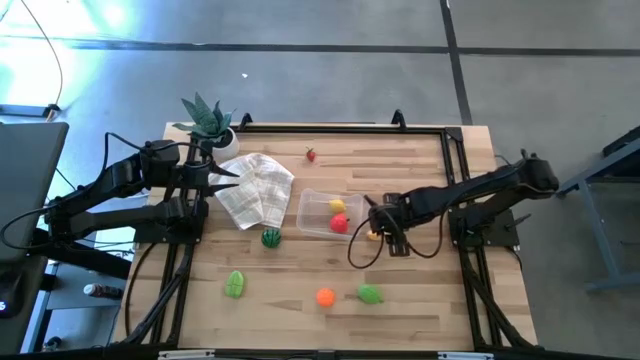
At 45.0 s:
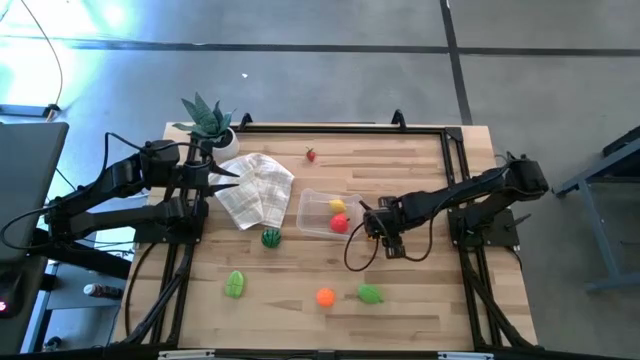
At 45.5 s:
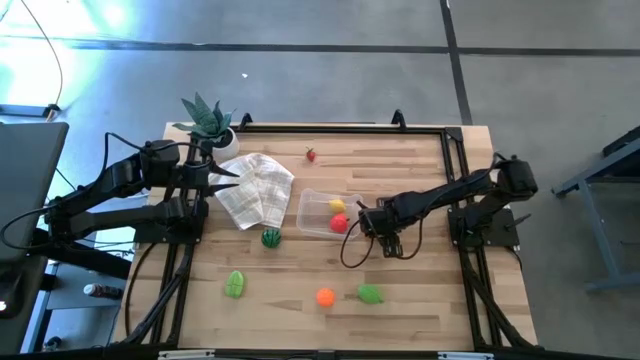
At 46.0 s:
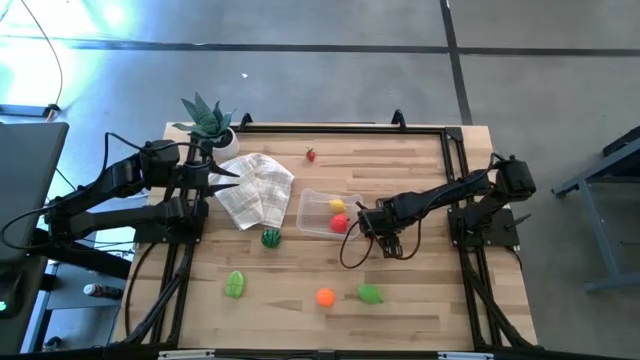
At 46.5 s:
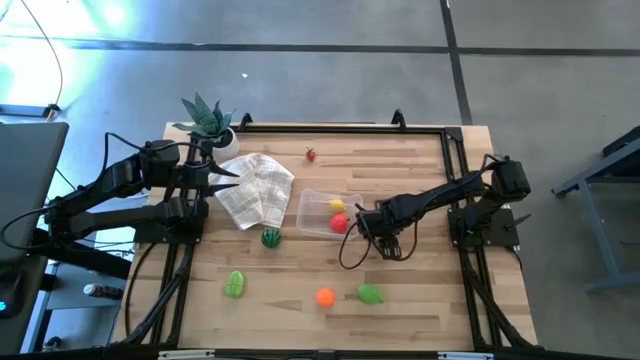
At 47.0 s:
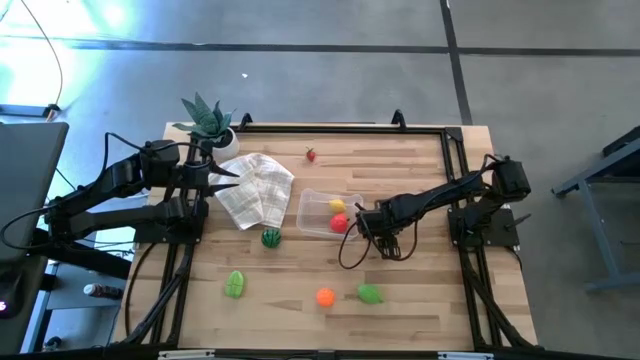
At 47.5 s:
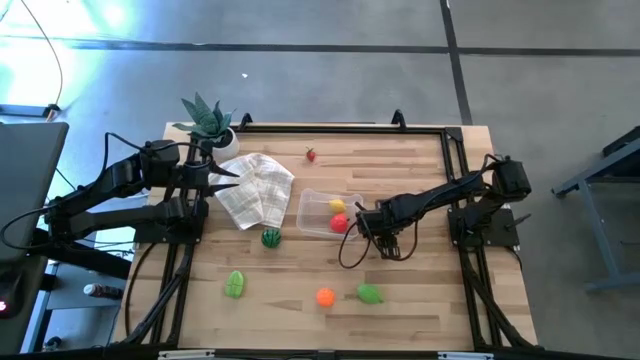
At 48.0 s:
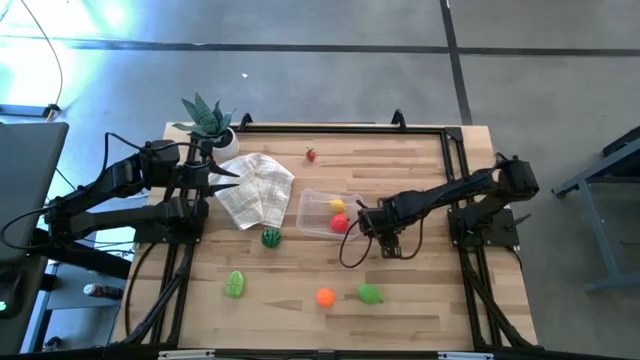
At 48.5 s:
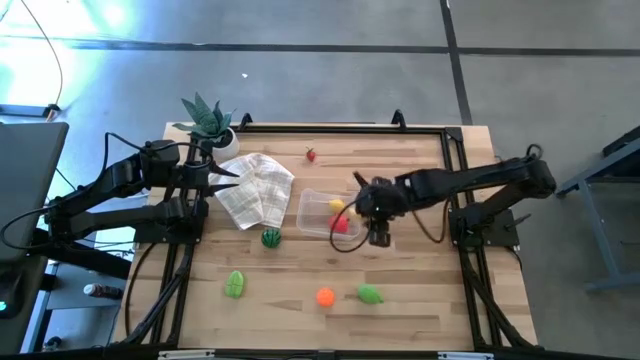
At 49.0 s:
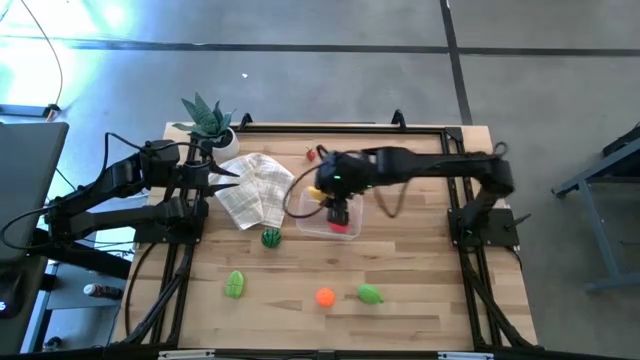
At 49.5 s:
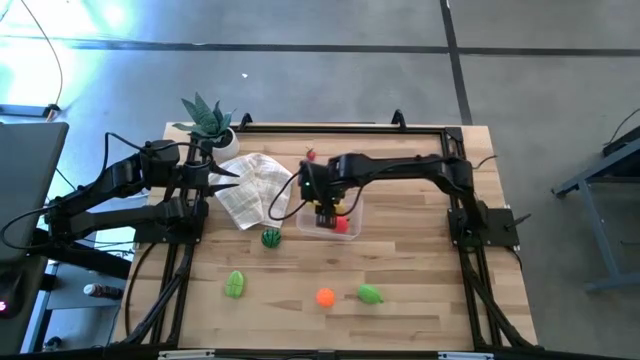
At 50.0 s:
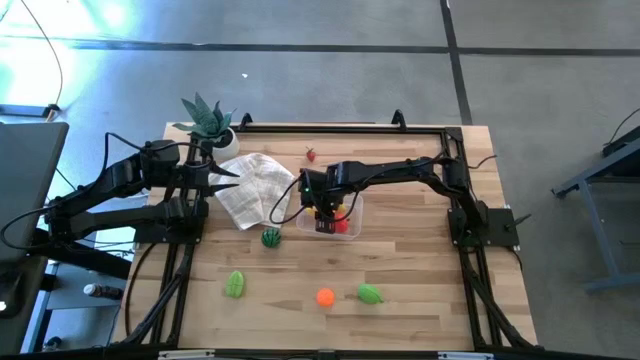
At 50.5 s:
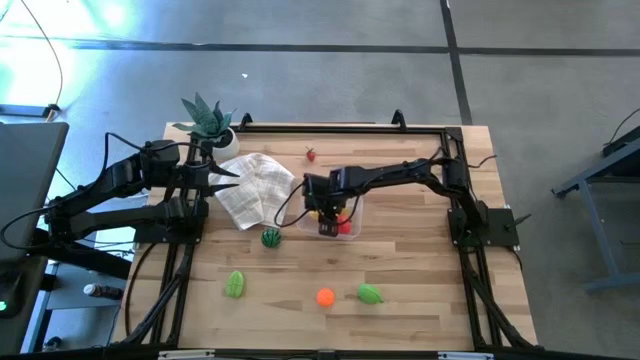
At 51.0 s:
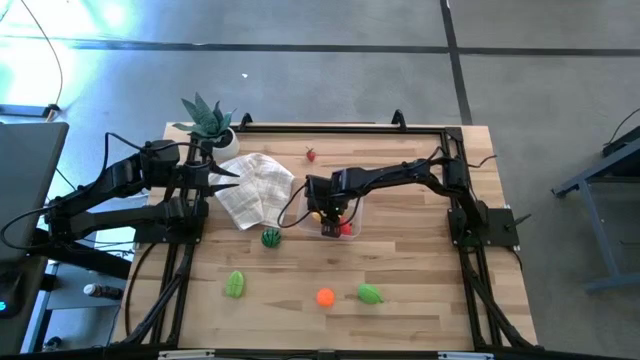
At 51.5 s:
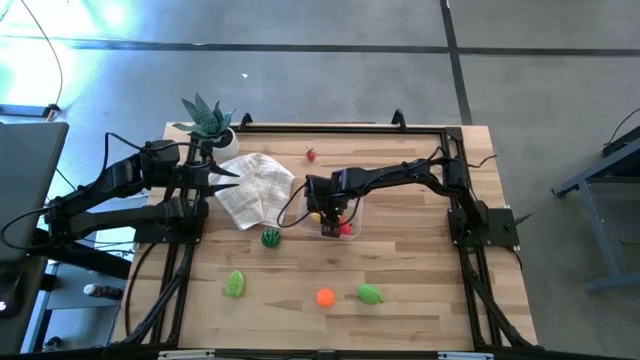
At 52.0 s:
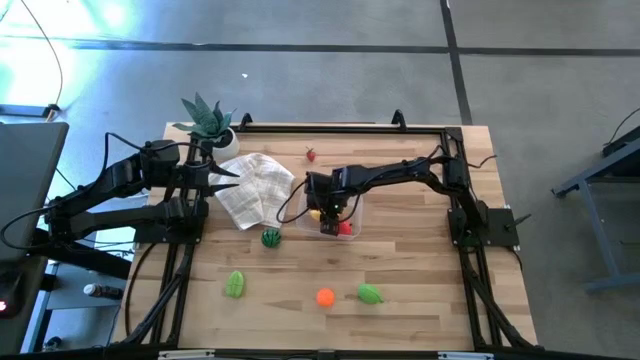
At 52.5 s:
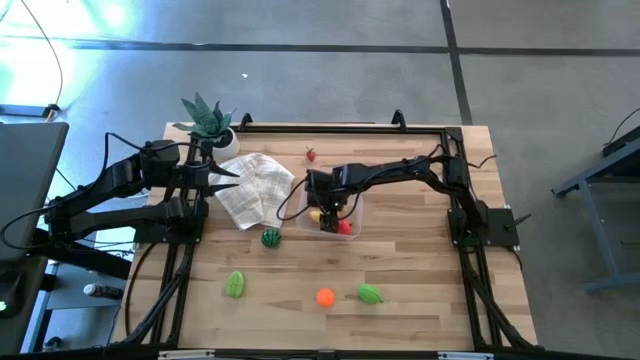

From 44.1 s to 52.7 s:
Task: Pick and placing Produce into tupperware
Put the yellow banana into the transparent container

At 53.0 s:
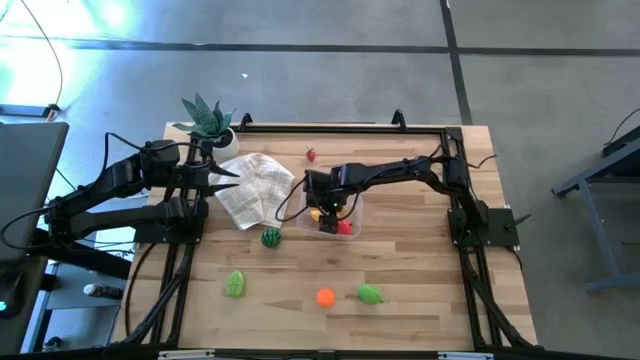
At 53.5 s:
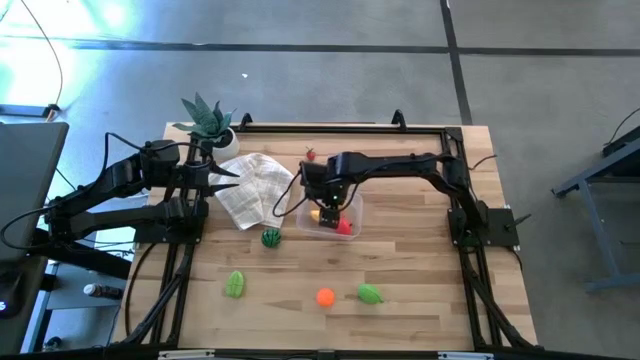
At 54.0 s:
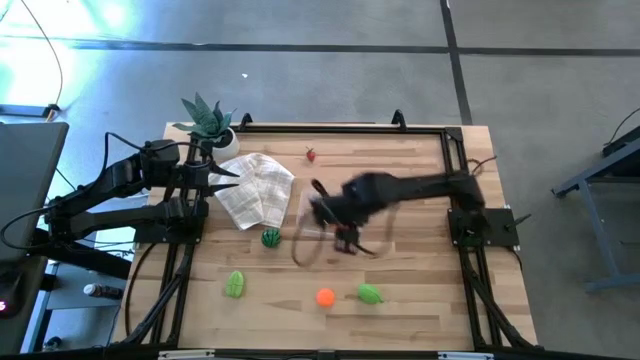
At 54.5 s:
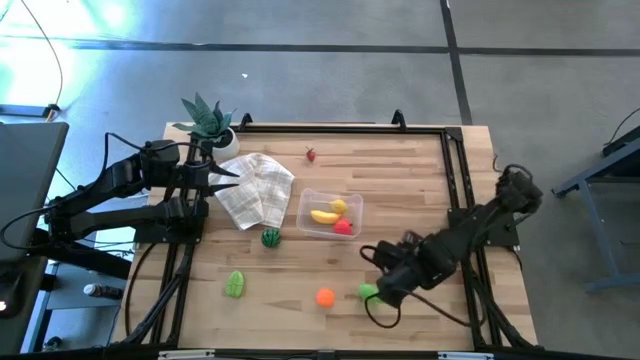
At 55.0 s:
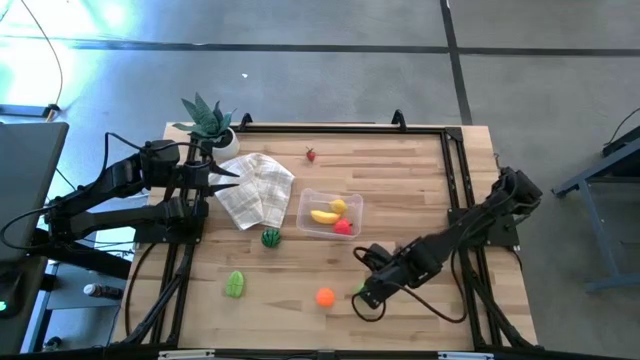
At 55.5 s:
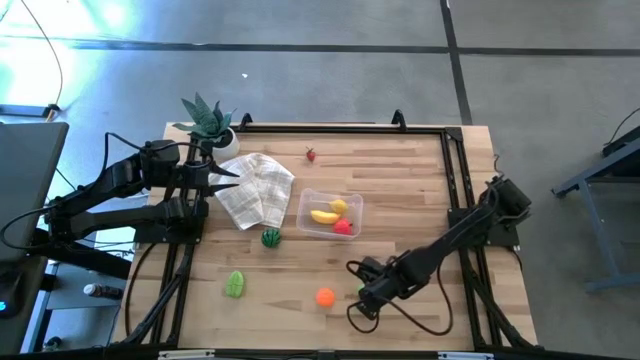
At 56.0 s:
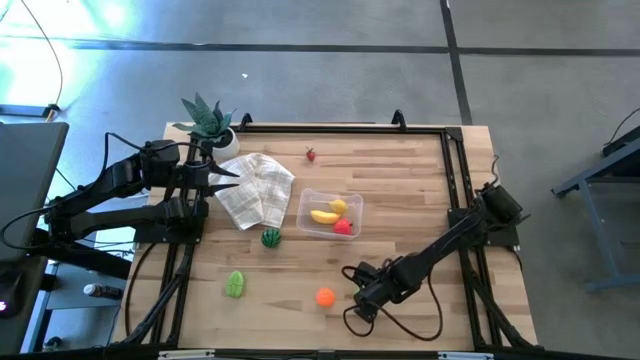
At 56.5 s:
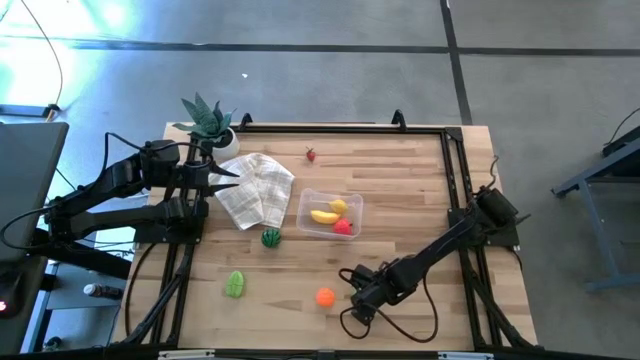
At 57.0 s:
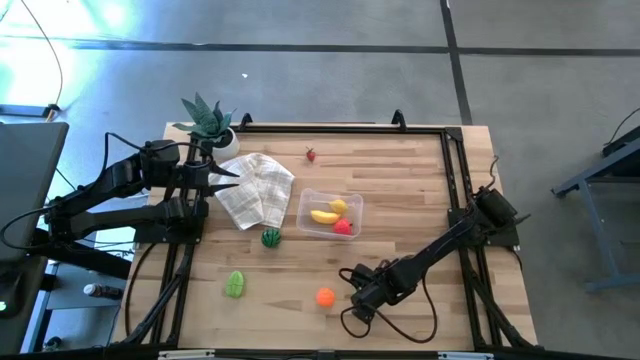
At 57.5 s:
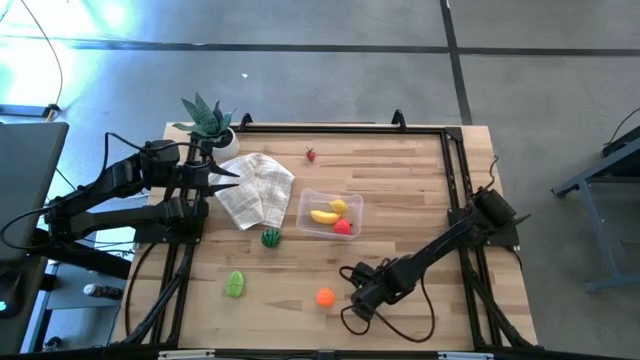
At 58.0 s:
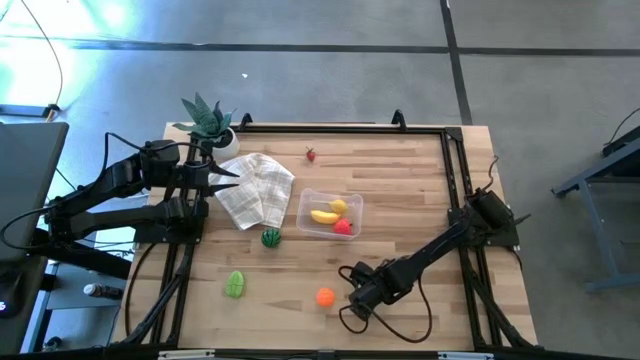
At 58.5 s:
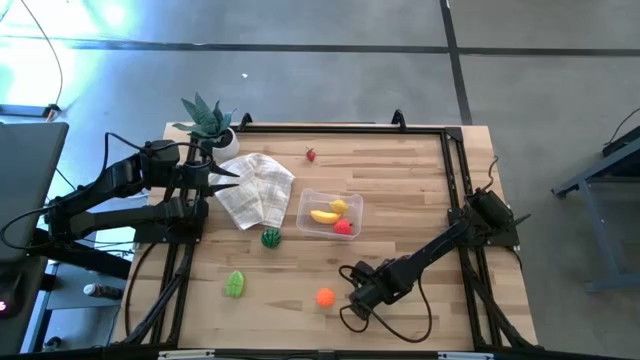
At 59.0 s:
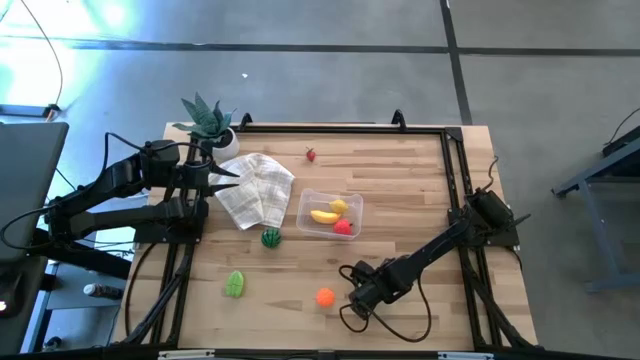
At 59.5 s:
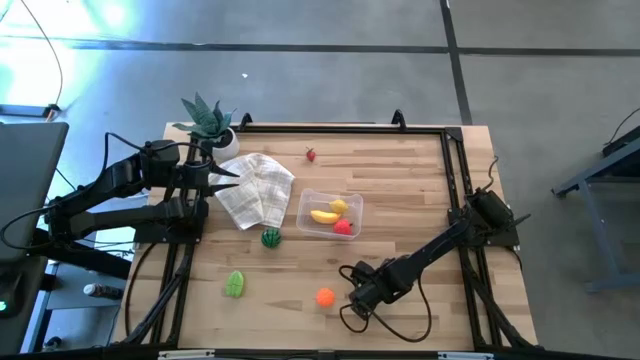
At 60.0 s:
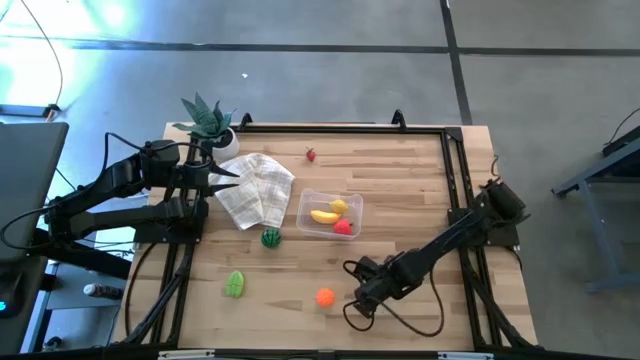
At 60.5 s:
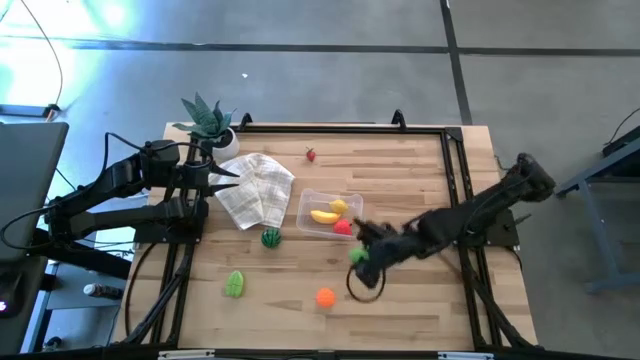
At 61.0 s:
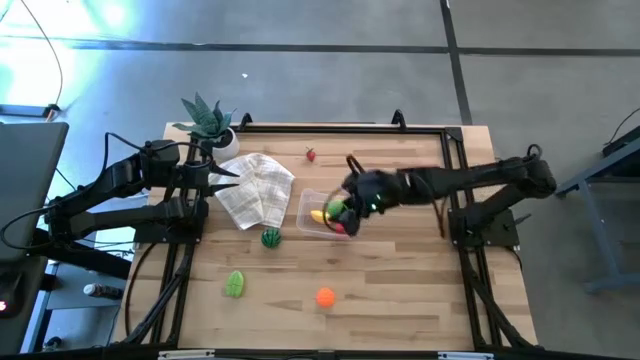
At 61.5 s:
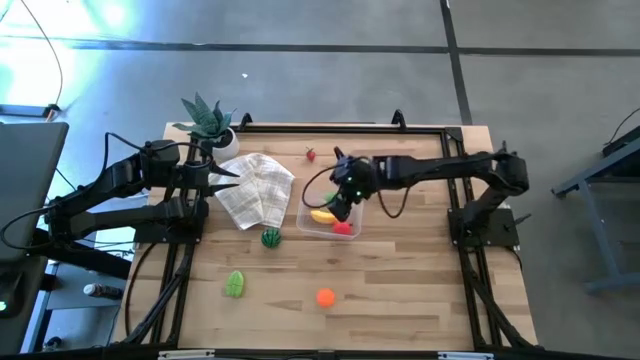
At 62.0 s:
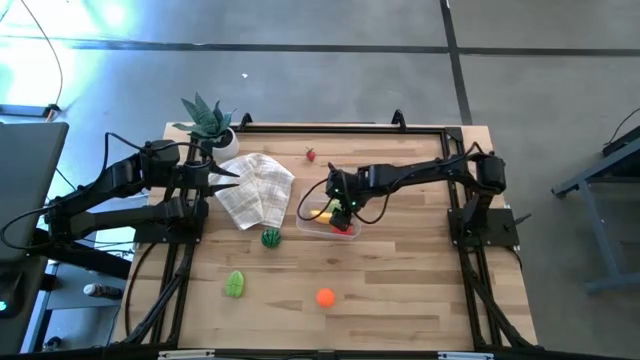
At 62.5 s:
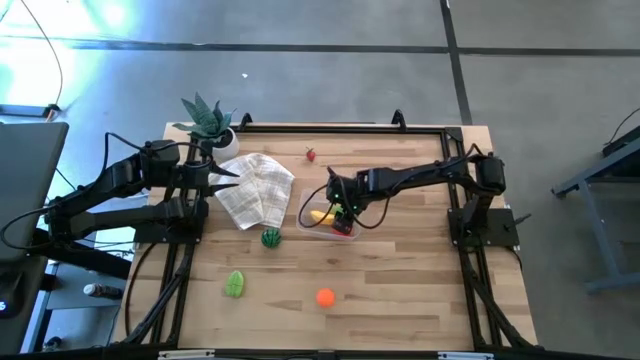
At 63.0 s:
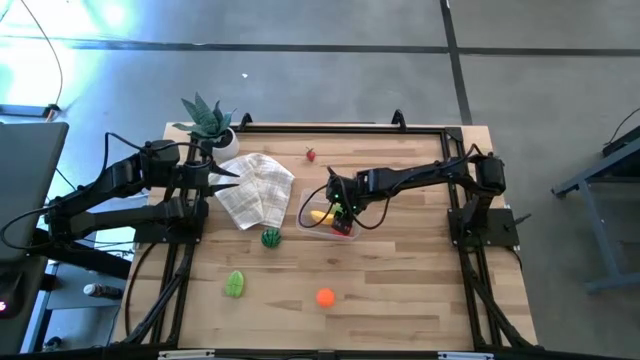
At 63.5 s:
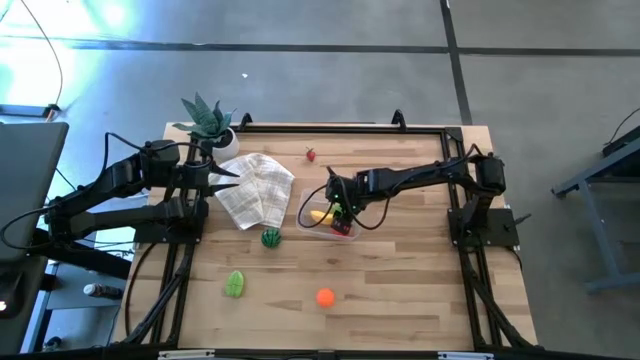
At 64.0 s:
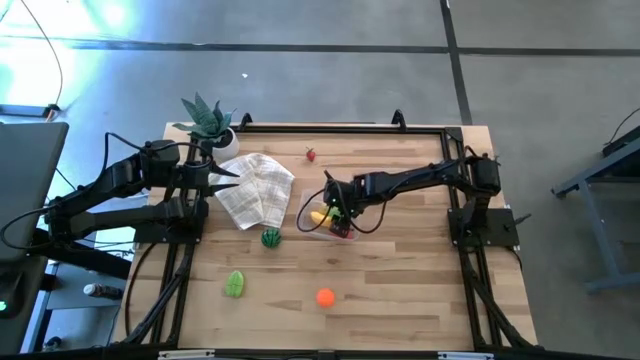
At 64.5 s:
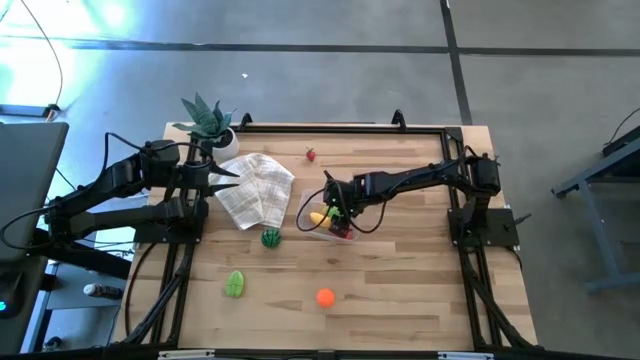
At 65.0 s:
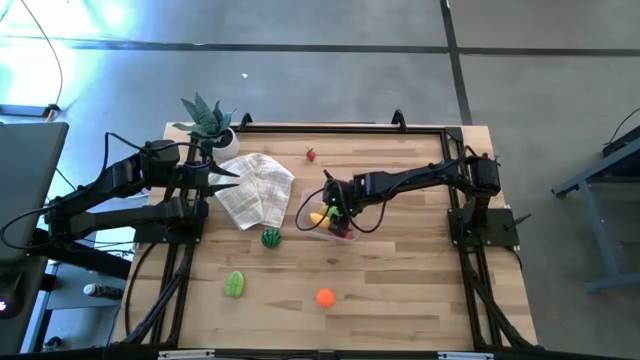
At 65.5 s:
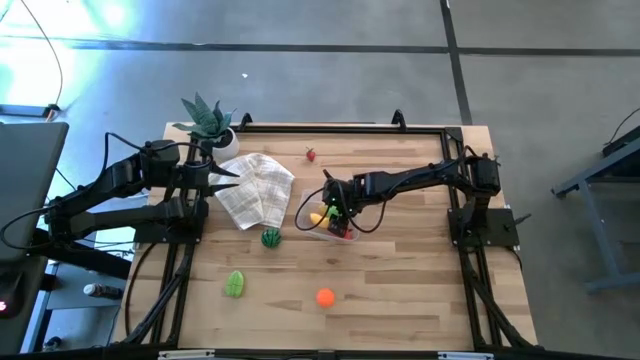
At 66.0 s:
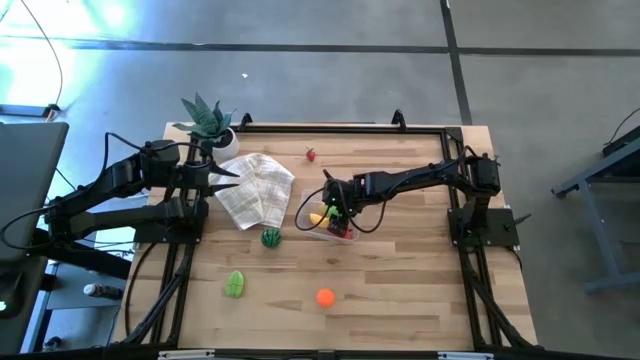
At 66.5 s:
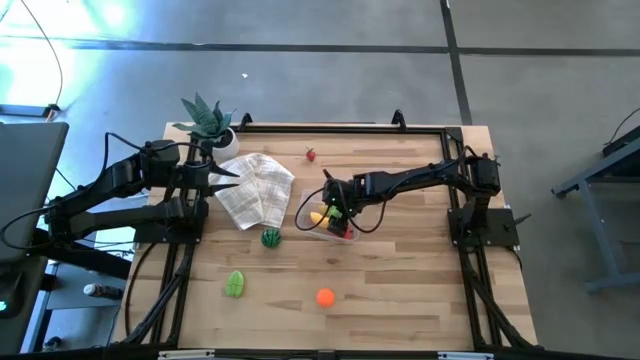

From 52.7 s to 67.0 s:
Put the green melon into the transparent container

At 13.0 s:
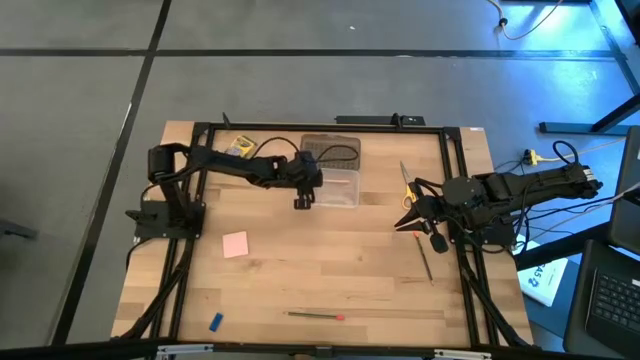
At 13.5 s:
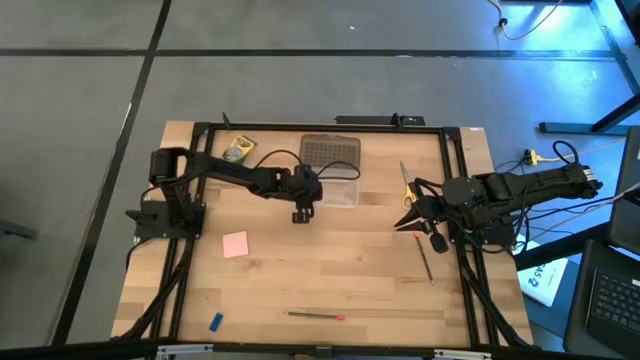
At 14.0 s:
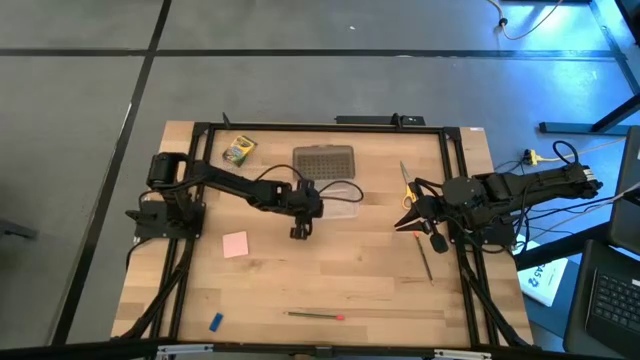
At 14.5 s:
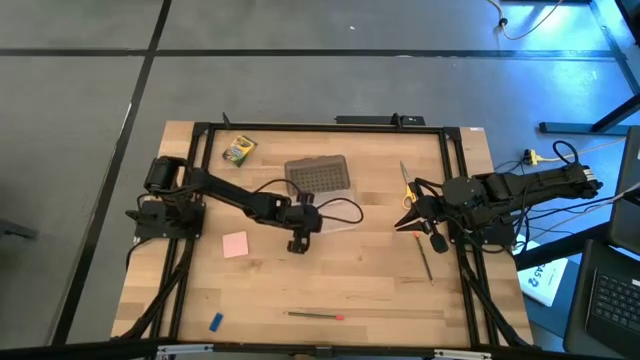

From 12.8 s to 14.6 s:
Task: Pack school essentials
Adjust the black supply box
